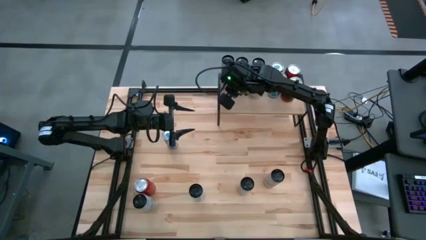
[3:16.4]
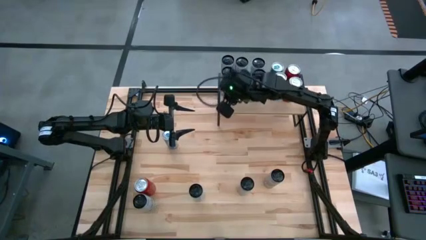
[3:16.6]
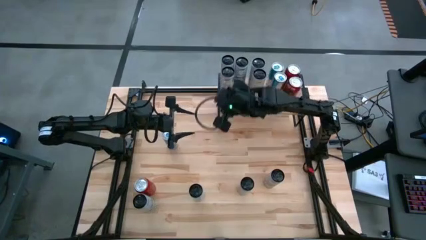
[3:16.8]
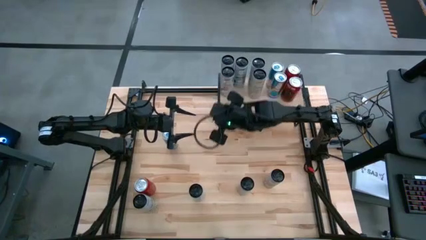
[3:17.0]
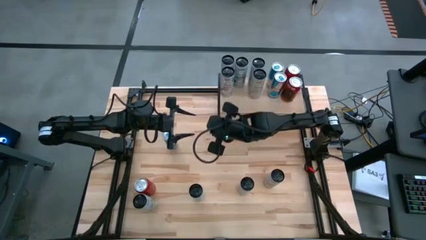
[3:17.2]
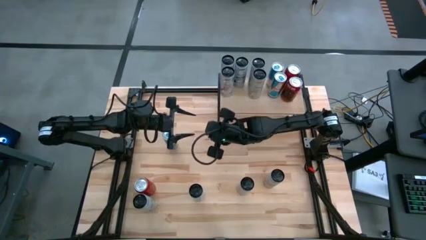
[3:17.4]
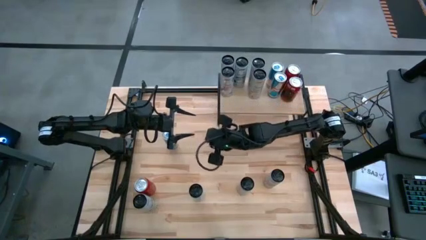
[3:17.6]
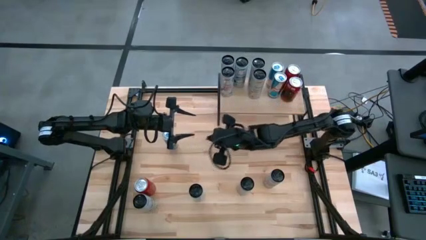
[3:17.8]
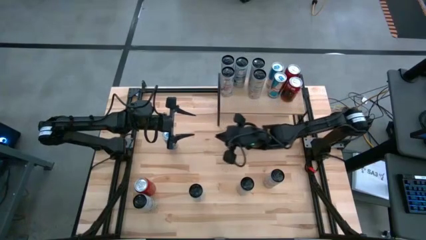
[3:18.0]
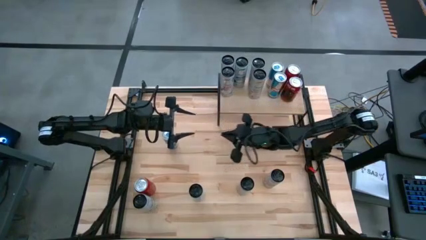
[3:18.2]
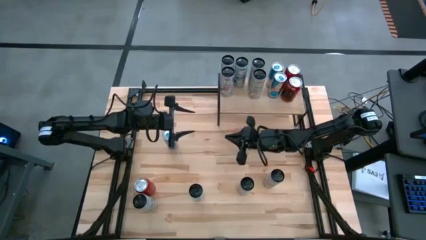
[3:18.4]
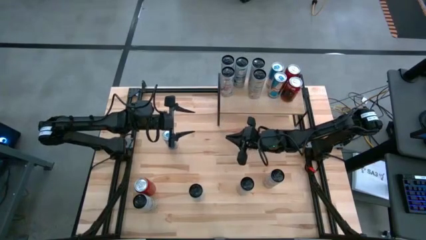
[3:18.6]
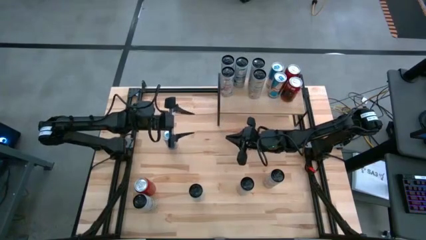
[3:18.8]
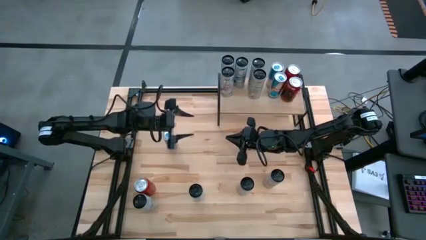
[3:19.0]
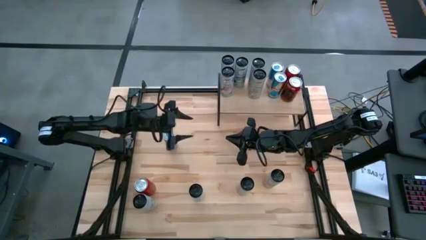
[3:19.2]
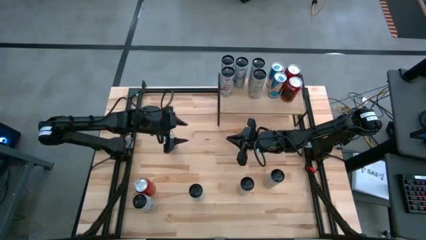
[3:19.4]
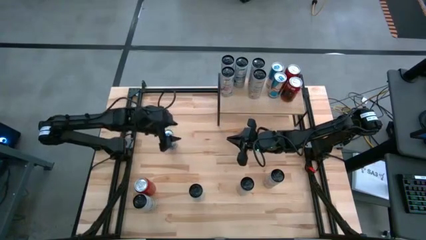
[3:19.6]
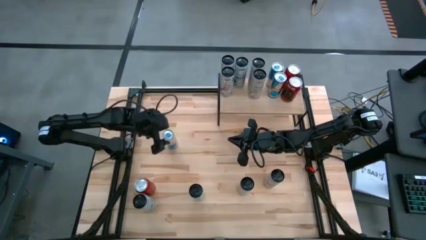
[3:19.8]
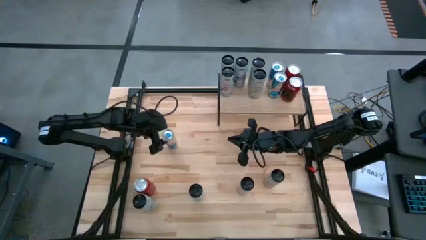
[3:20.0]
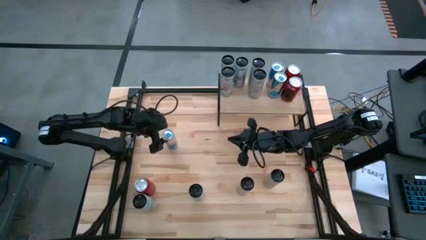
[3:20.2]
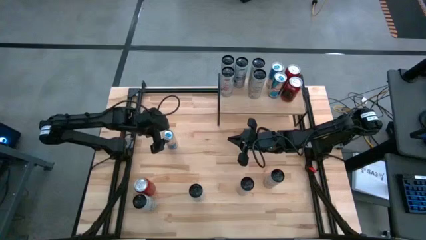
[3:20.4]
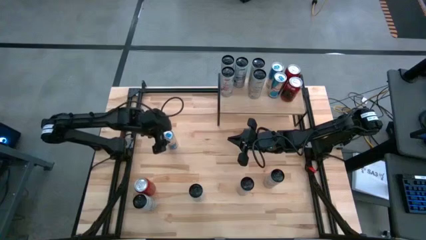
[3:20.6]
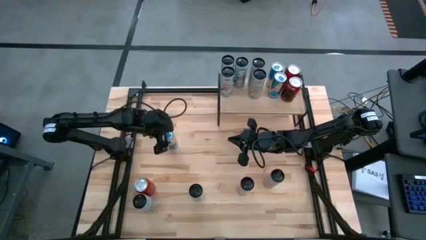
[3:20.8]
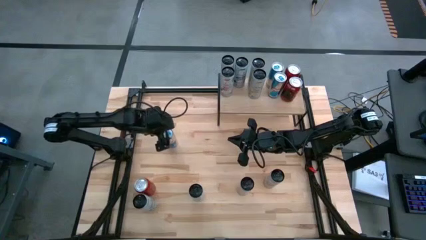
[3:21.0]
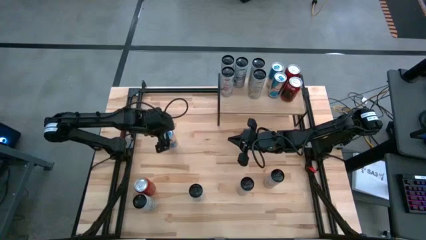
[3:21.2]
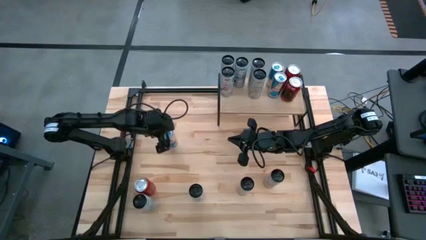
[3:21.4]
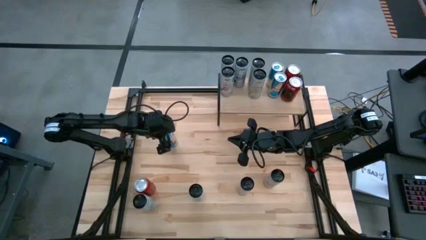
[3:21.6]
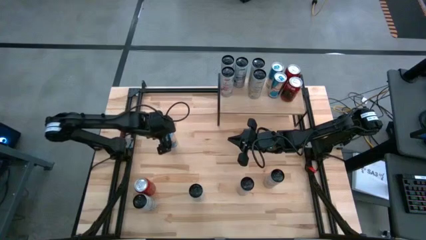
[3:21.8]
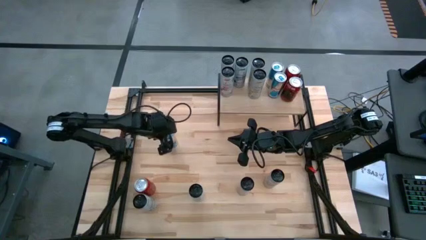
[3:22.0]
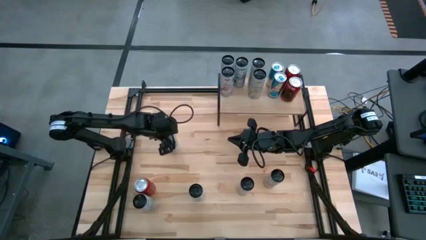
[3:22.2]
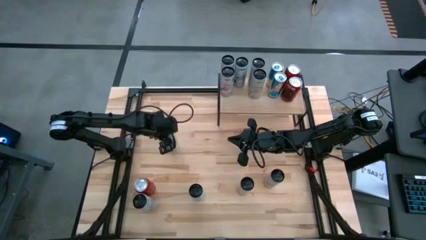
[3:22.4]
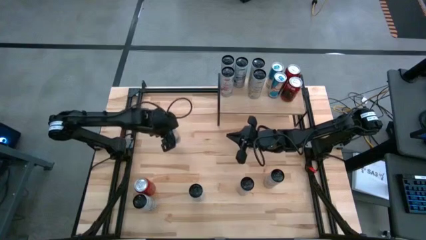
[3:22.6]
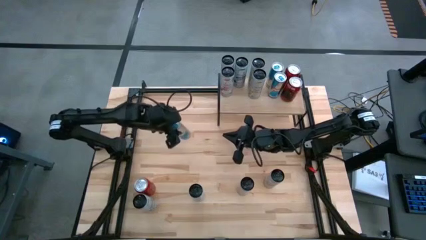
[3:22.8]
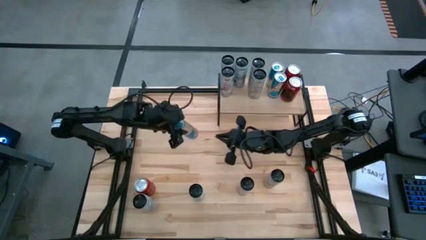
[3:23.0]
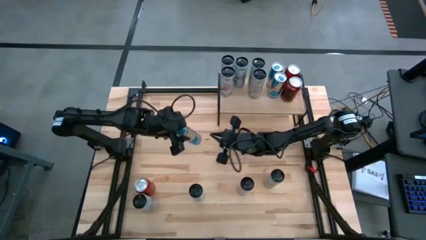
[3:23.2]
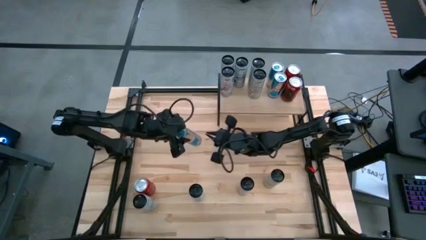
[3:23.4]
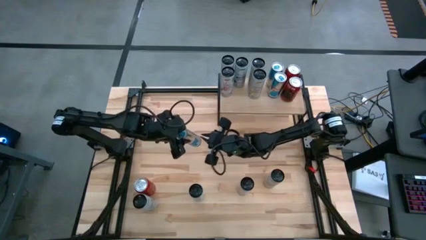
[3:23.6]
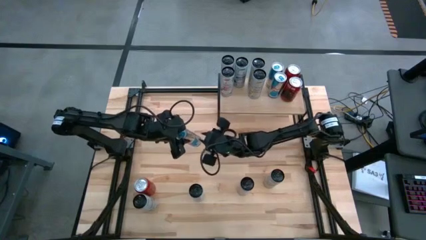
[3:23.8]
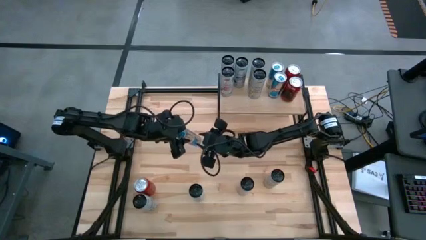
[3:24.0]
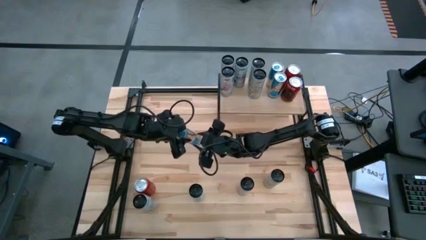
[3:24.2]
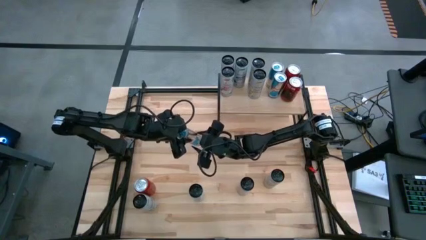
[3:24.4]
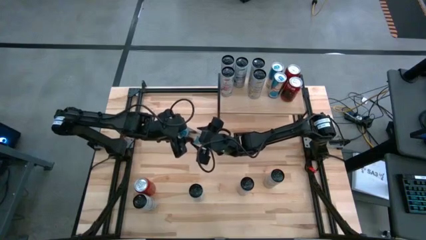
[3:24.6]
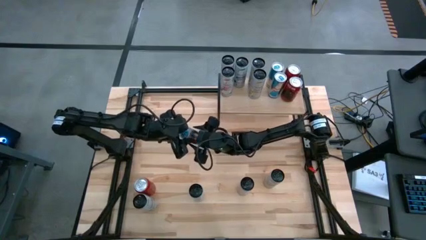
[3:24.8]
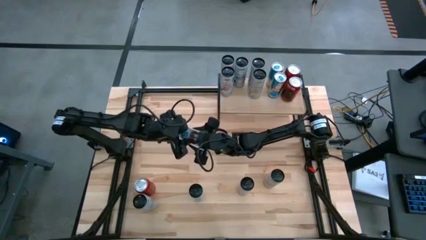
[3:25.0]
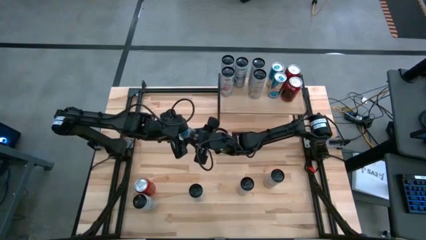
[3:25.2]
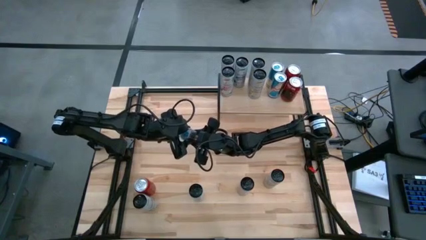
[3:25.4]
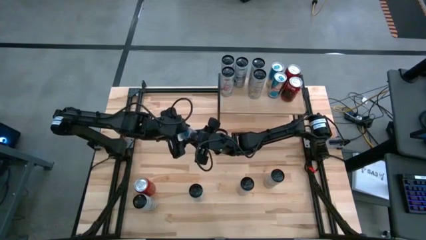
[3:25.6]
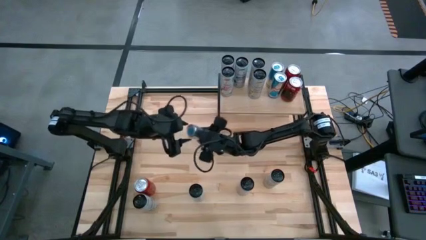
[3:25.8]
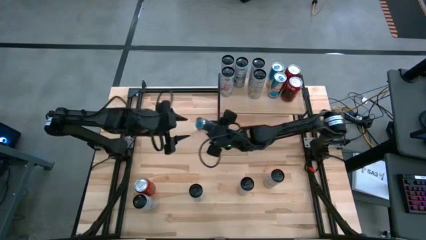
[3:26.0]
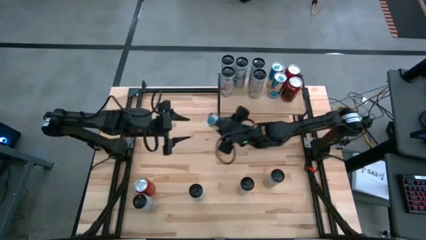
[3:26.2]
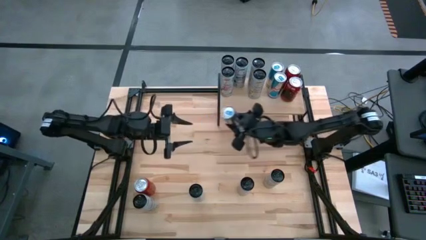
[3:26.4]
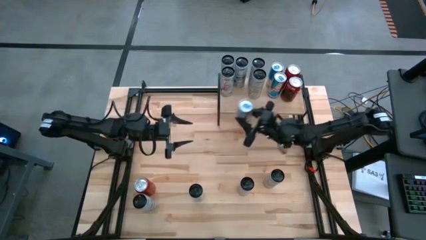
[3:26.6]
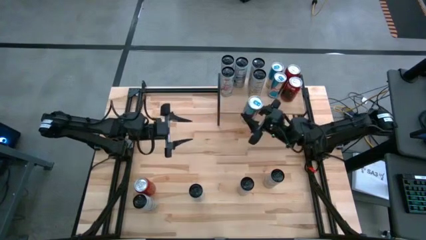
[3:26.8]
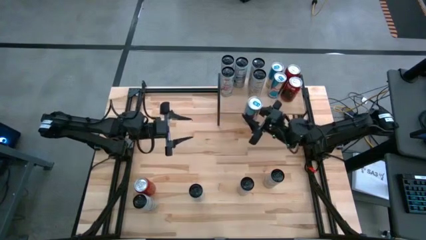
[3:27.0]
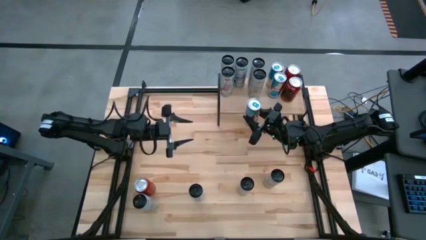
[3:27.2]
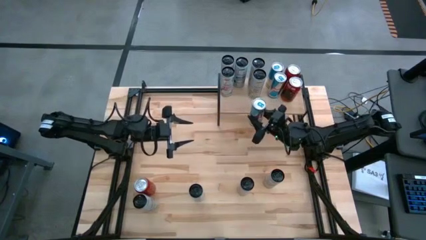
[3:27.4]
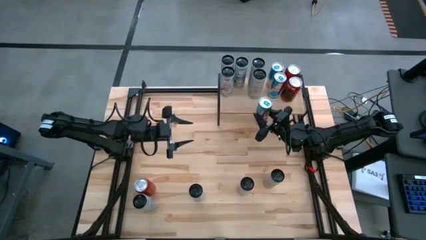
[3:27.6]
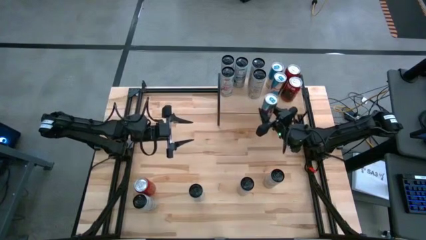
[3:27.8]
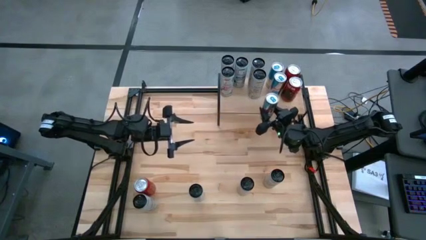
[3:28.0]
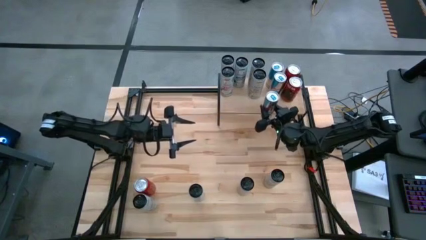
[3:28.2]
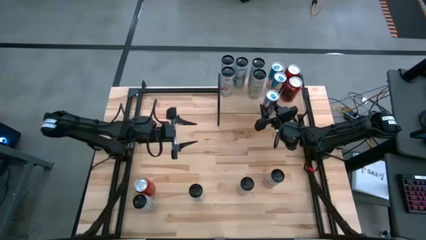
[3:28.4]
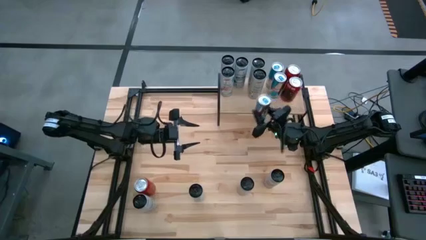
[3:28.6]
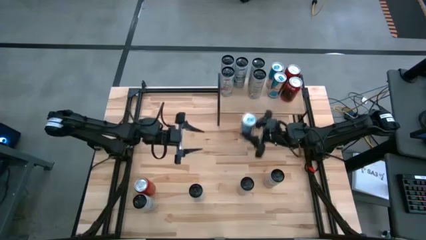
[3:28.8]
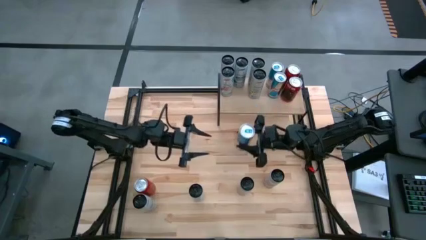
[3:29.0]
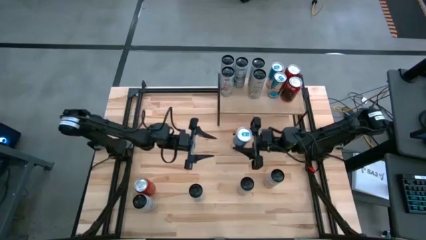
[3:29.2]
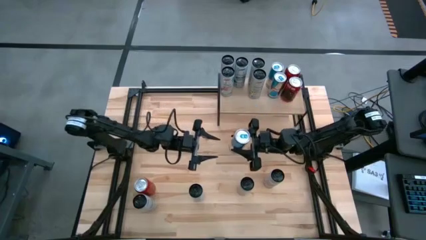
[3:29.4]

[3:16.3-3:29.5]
Task: Place canned beverage on shelf
Put the blue soda can on the shelf aligned with the other blue soda cans

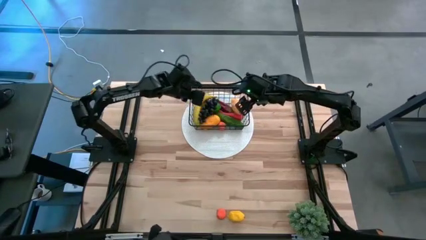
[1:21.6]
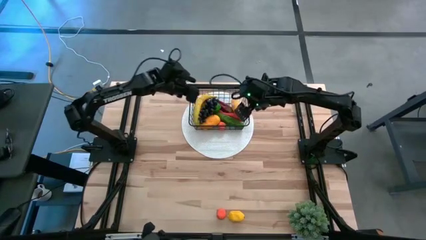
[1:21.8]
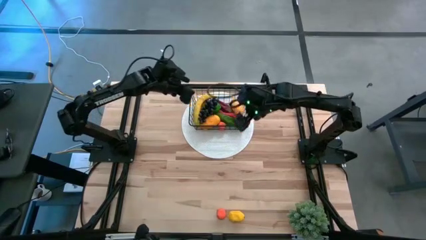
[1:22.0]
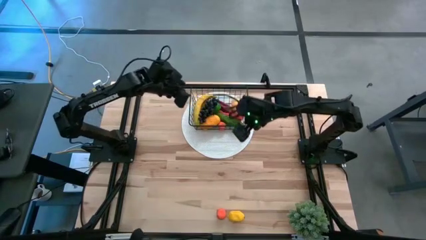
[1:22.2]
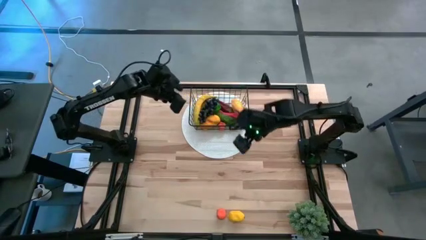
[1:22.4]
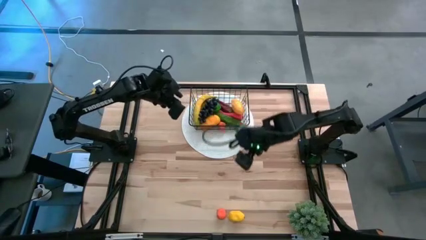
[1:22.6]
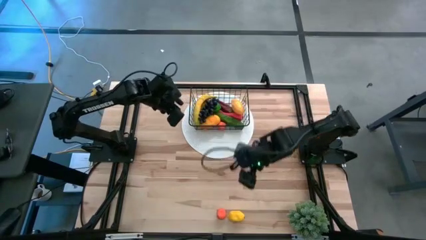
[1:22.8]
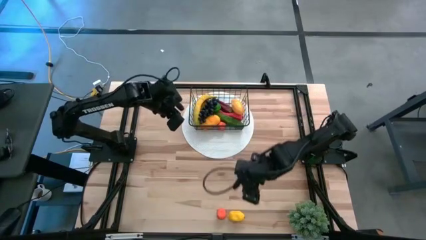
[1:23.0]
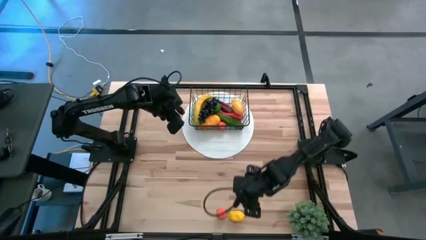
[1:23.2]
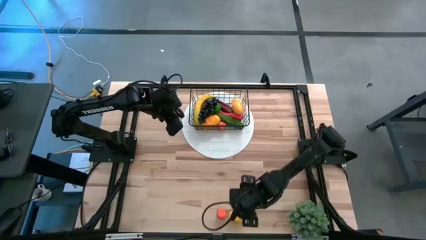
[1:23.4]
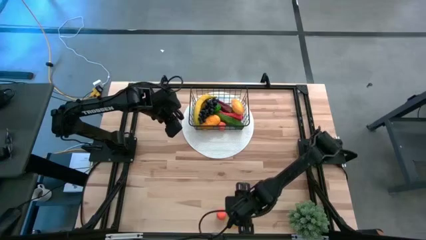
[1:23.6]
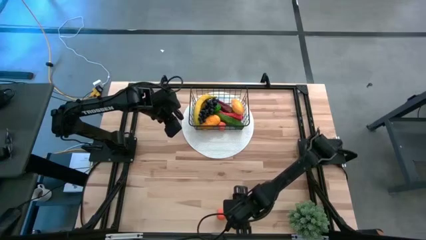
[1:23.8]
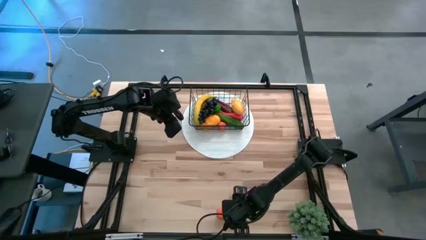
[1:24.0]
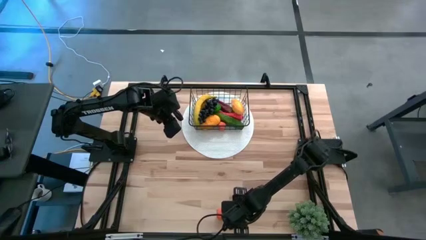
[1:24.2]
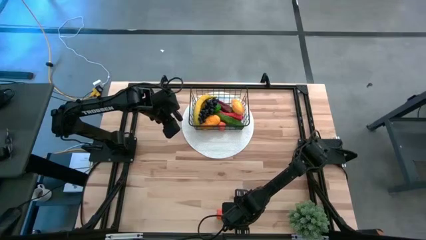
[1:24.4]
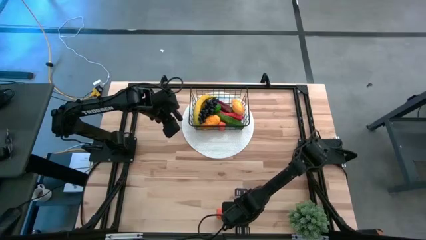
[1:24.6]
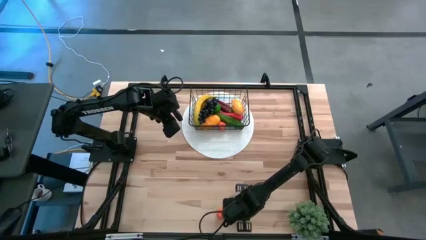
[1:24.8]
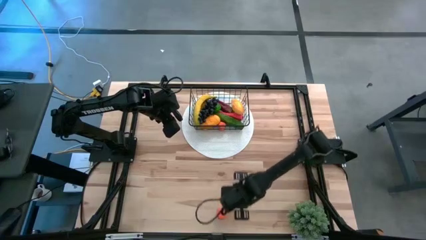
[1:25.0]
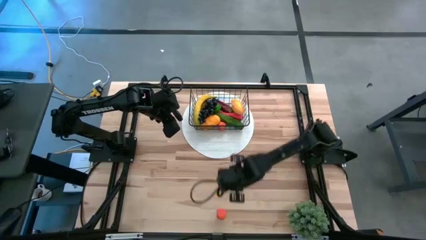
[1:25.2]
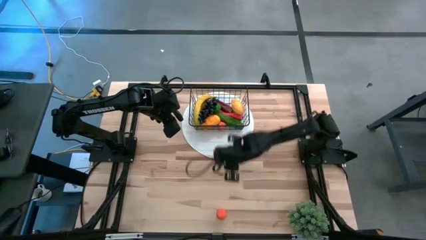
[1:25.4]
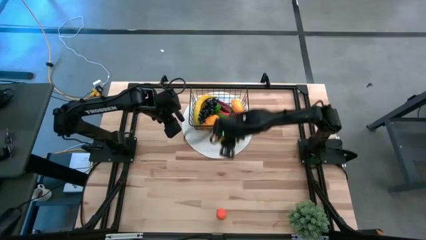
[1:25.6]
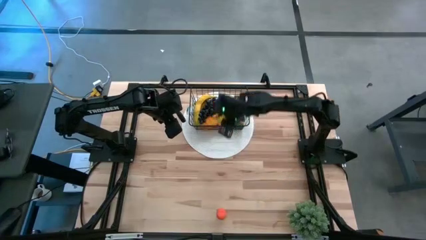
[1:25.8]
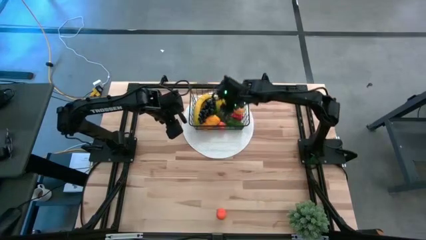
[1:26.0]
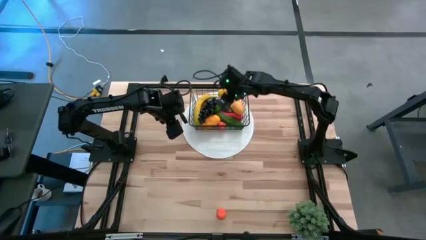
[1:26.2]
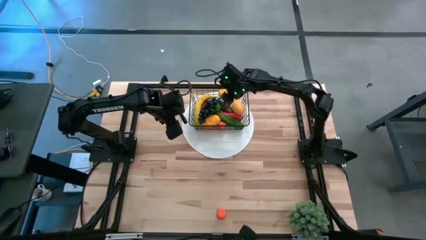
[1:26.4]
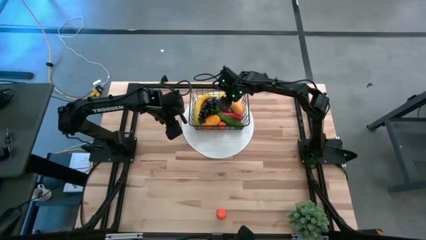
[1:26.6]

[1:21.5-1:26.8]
Task: Build produce basket
Put the yellow lemon into the black wire basket
